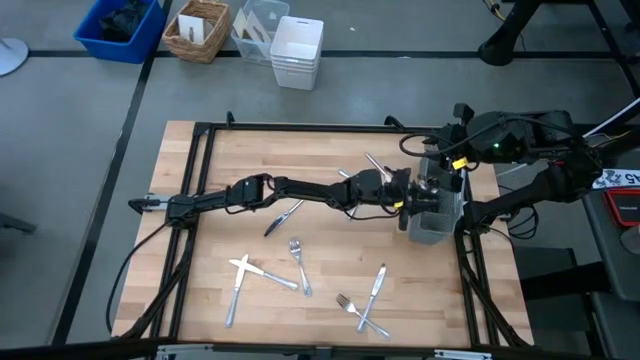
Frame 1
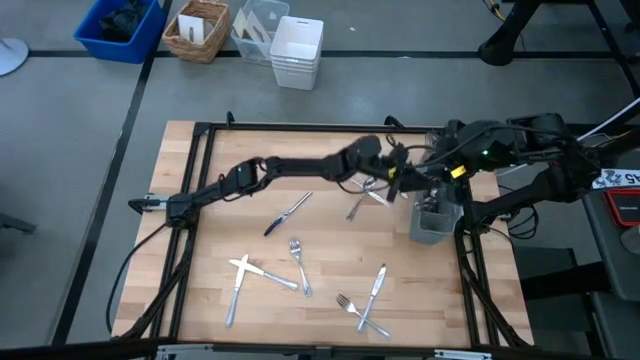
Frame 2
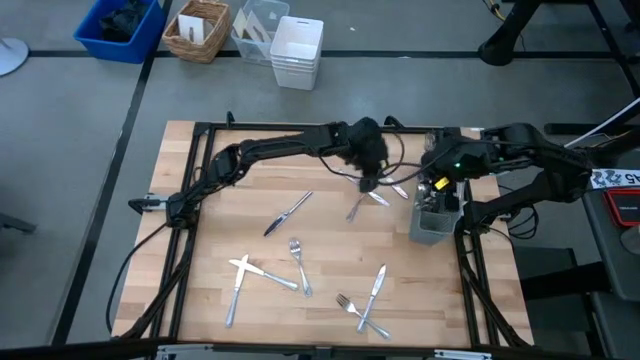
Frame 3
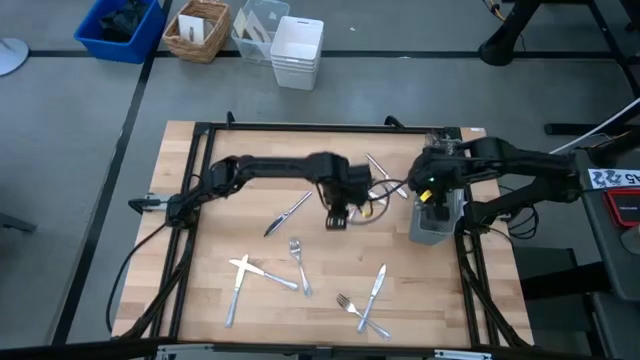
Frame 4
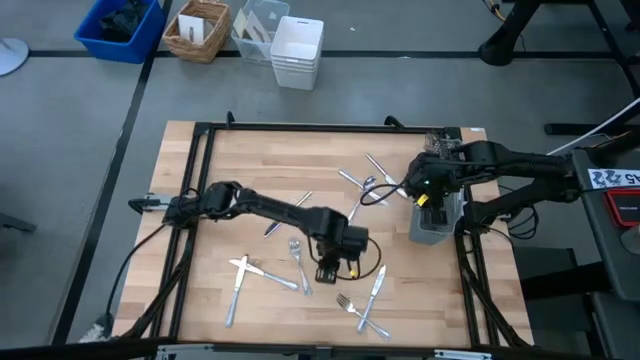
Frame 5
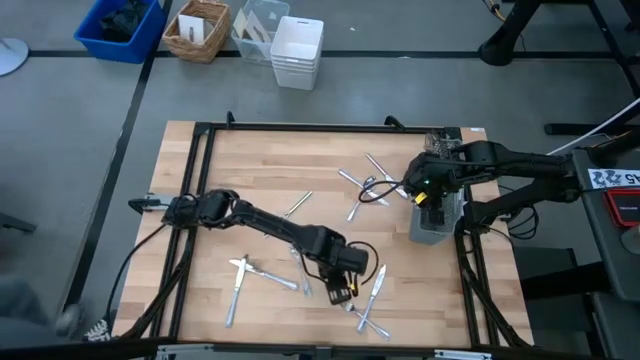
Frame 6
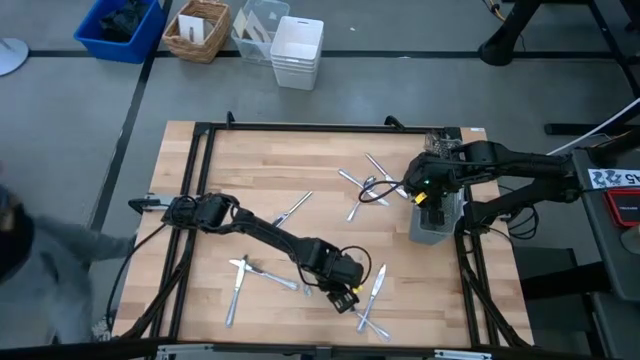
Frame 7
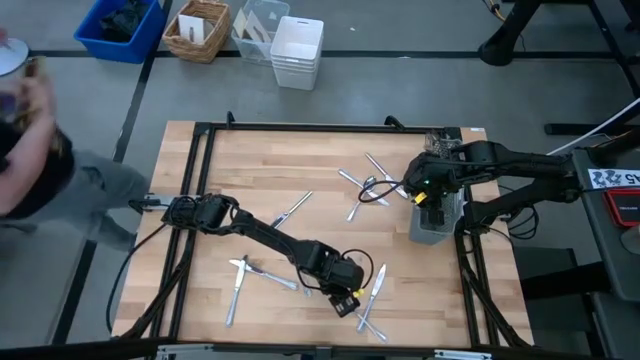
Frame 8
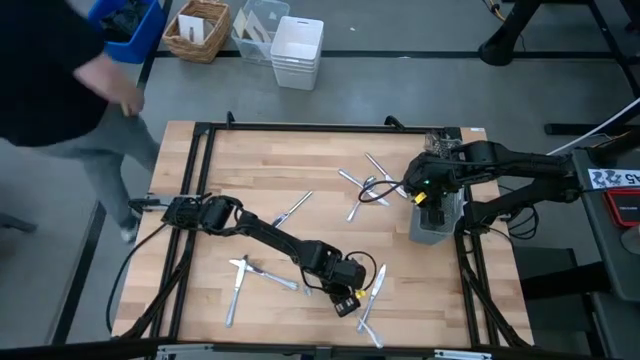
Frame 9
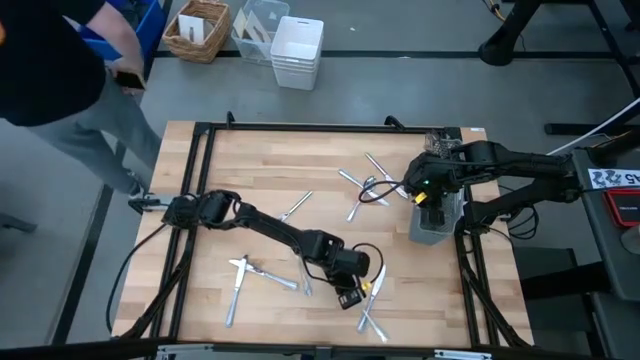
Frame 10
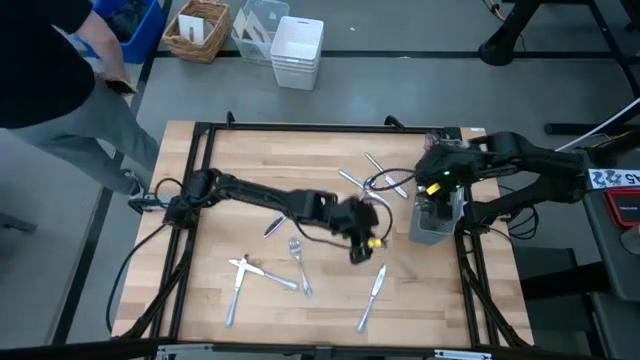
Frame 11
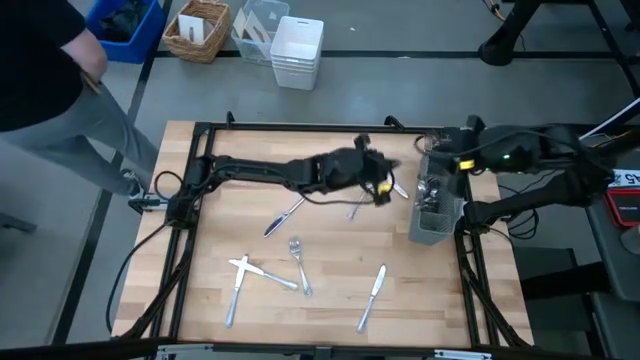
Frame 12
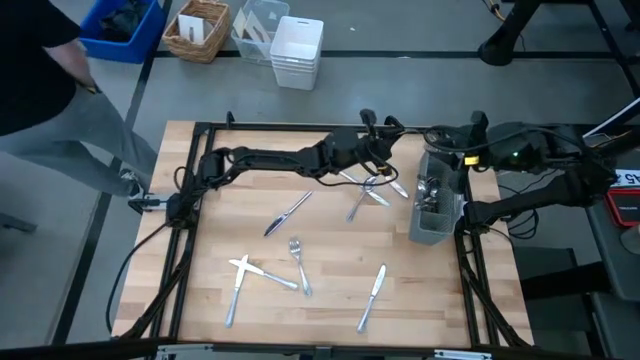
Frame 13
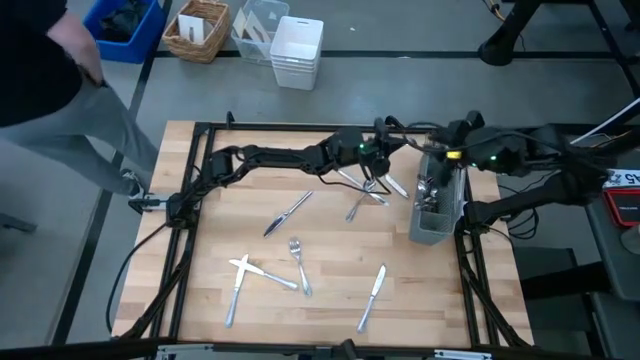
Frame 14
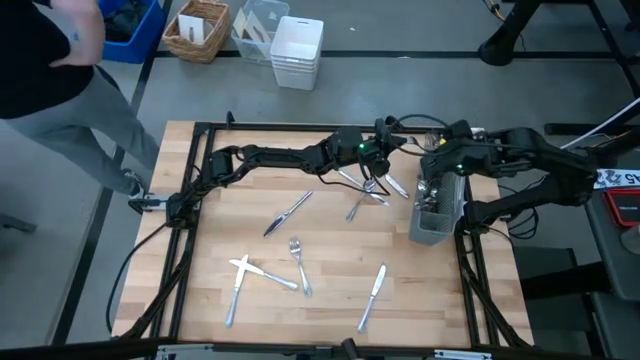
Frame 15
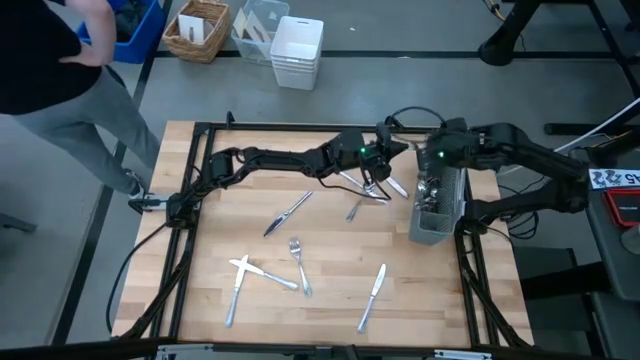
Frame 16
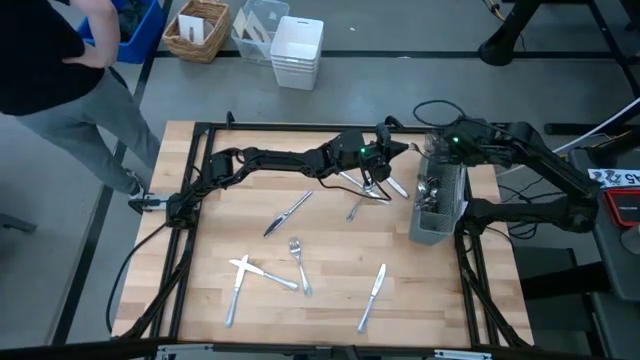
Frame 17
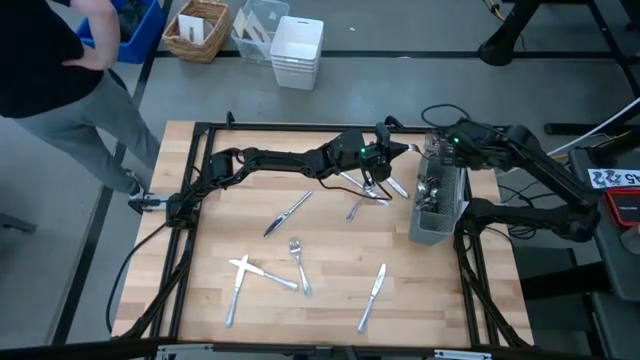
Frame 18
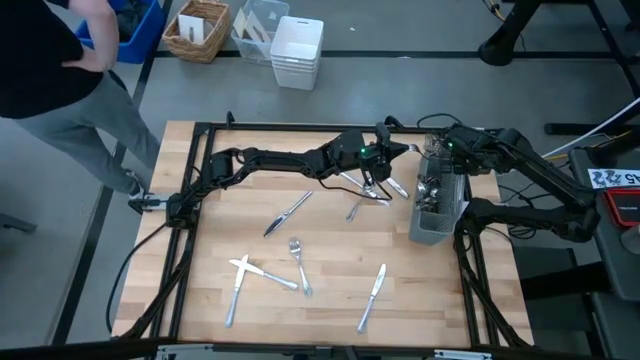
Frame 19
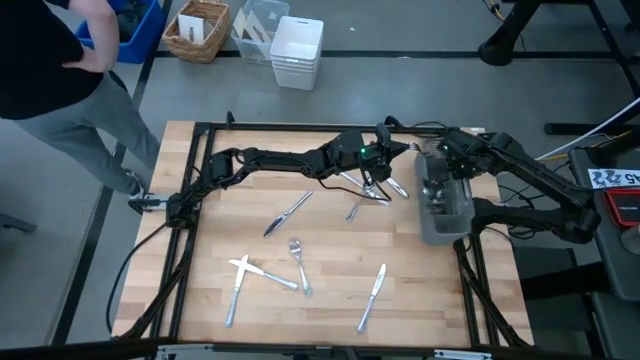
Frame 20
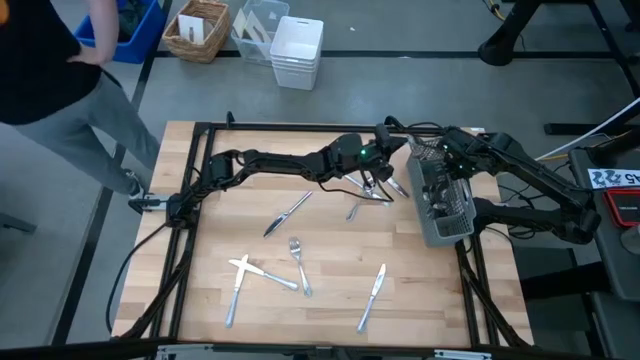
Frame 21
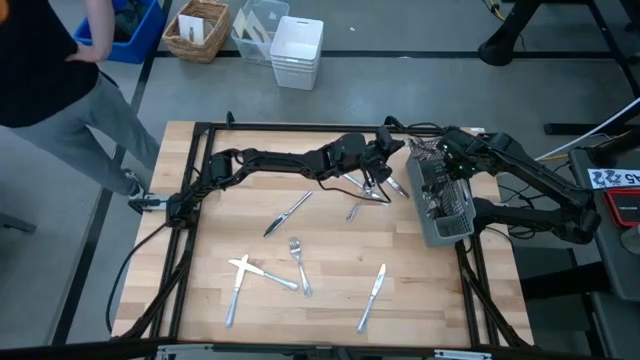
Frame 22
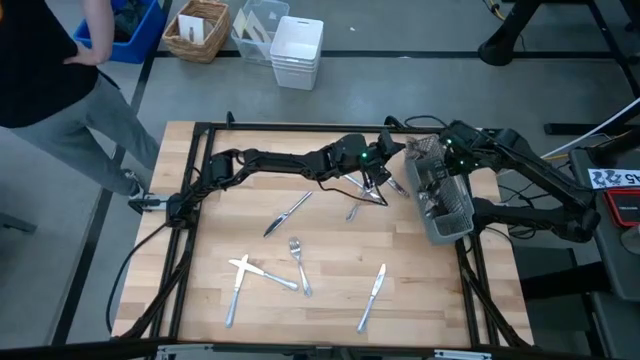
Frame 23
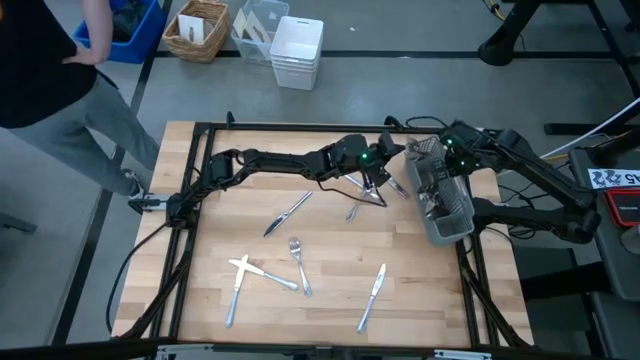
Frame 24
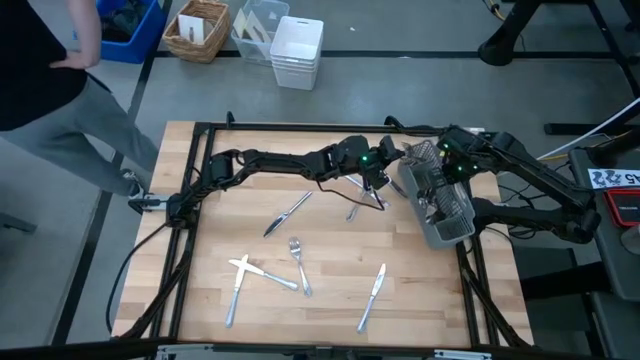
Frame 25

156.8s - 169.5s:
Task: Sort silverware
Put the bottom fork into the left section of the utensil holder

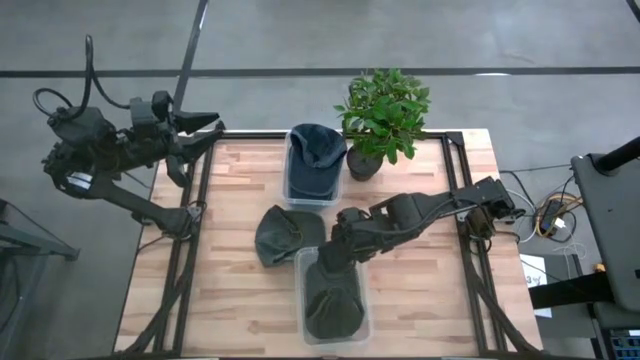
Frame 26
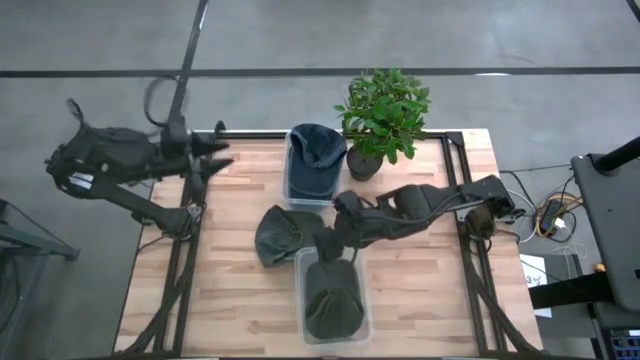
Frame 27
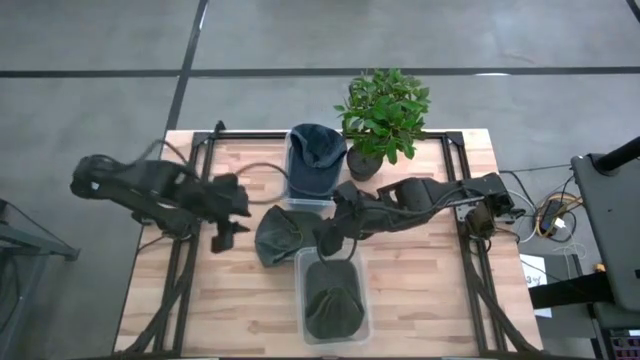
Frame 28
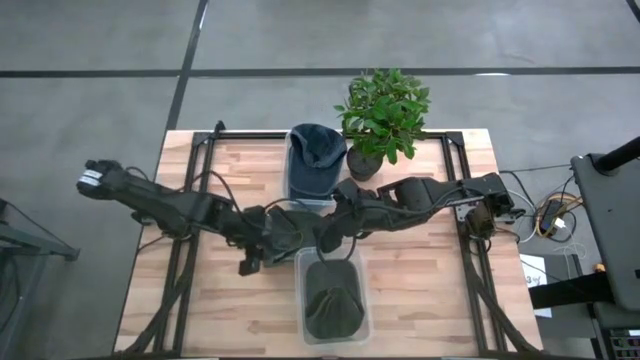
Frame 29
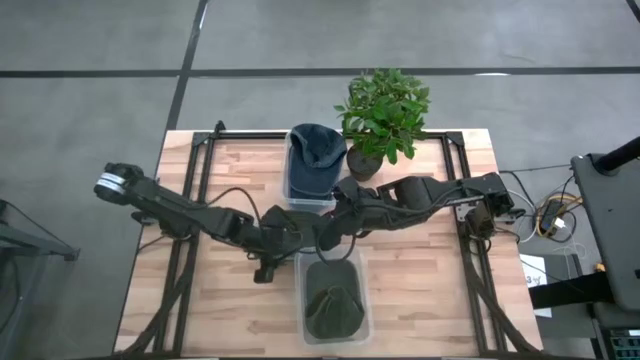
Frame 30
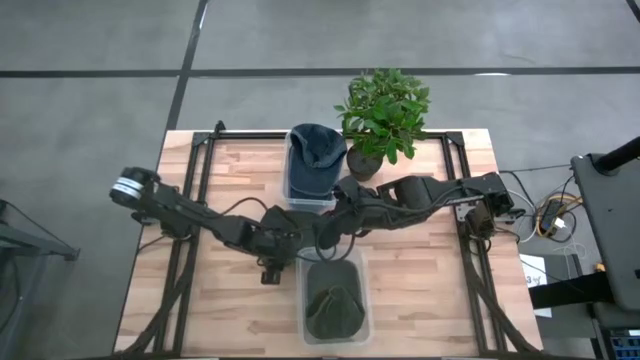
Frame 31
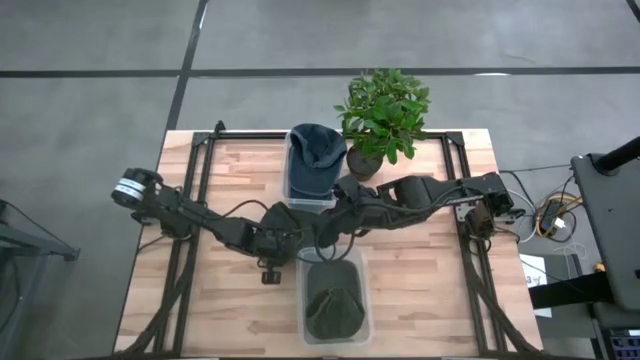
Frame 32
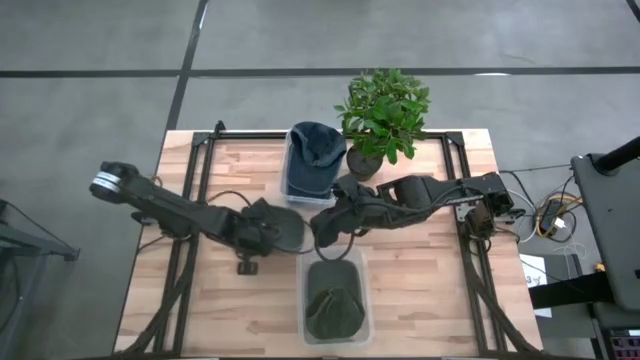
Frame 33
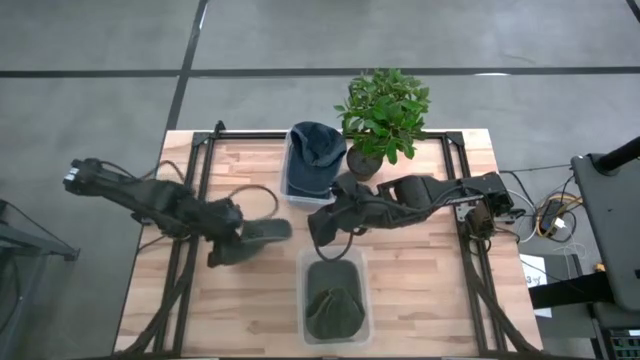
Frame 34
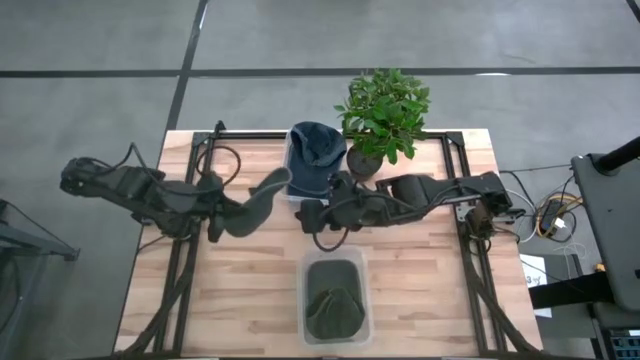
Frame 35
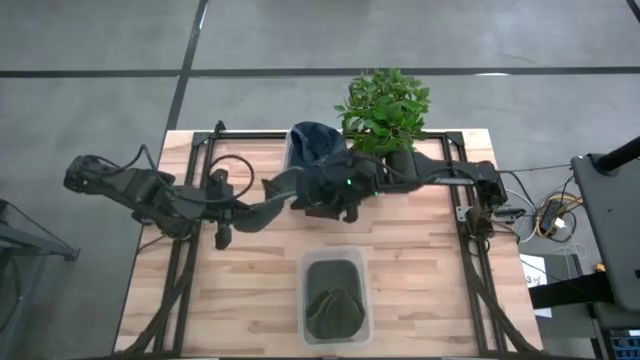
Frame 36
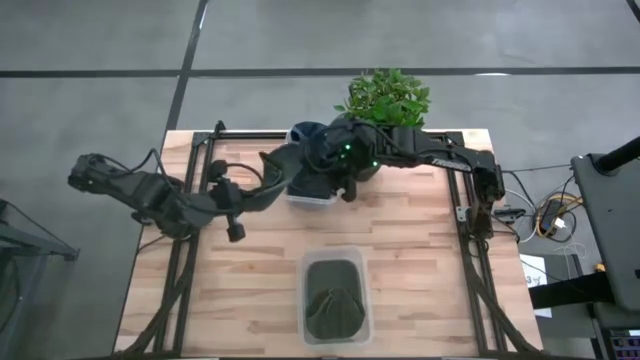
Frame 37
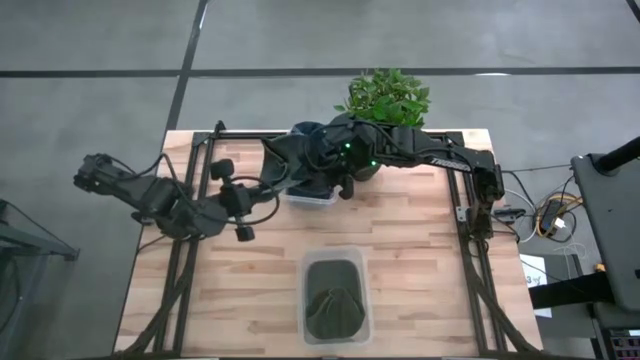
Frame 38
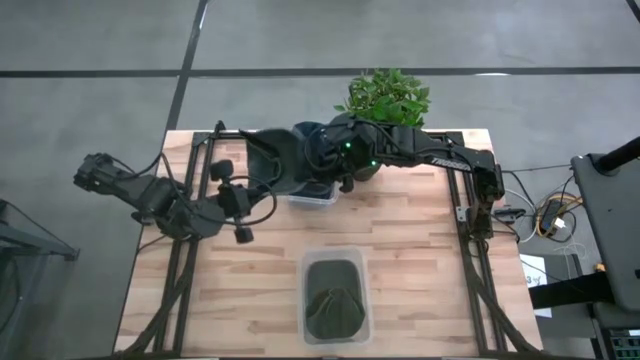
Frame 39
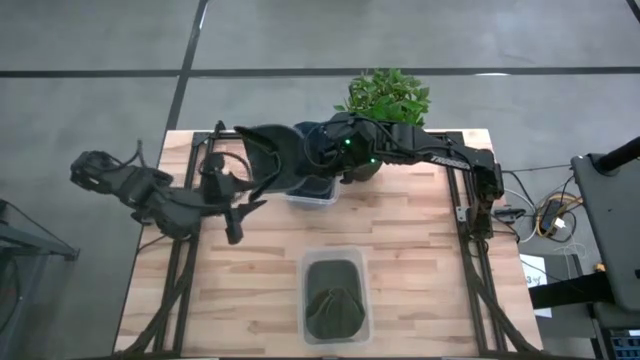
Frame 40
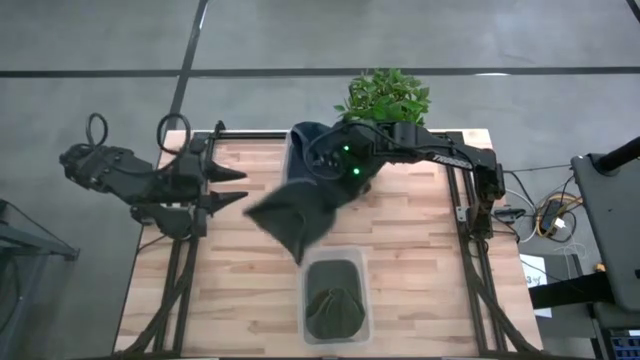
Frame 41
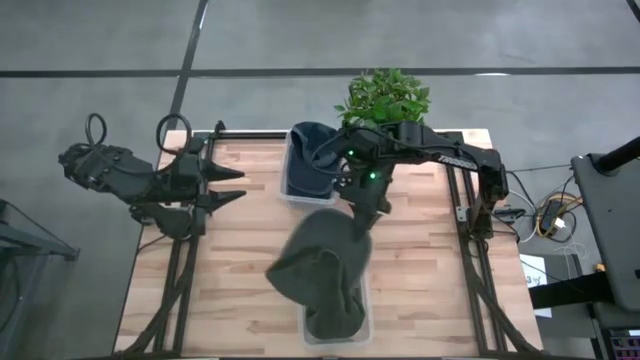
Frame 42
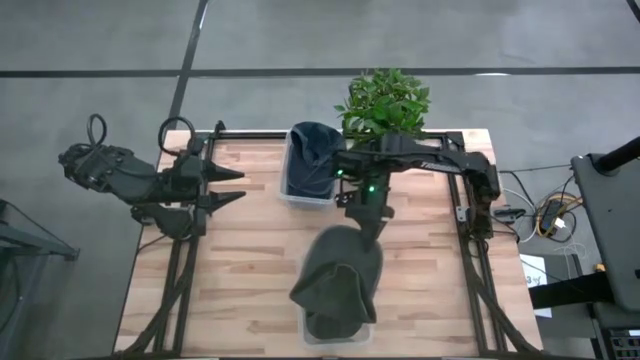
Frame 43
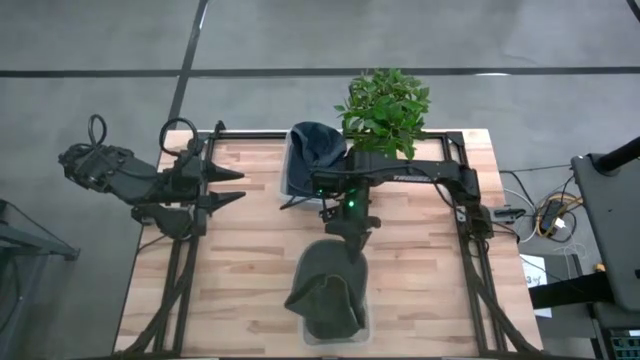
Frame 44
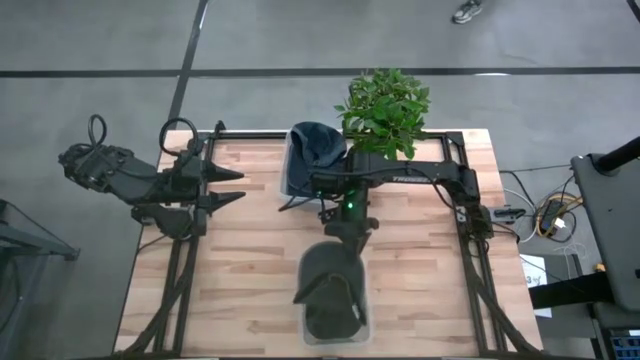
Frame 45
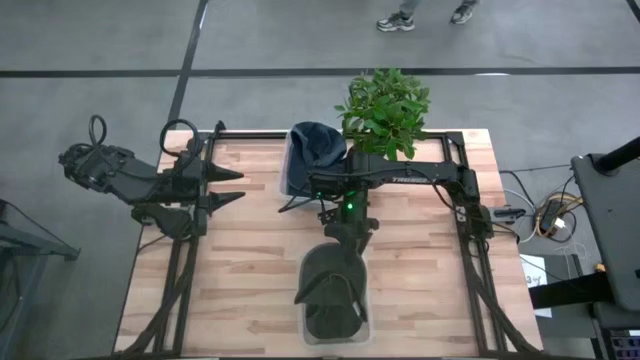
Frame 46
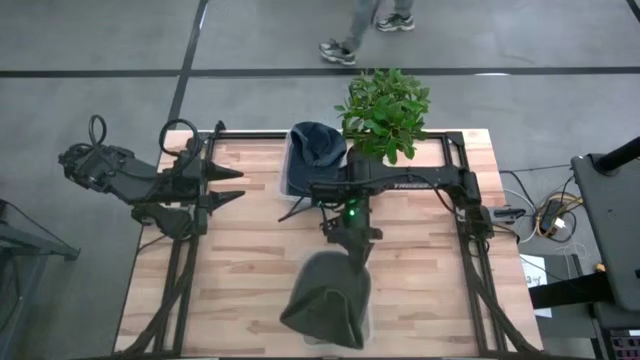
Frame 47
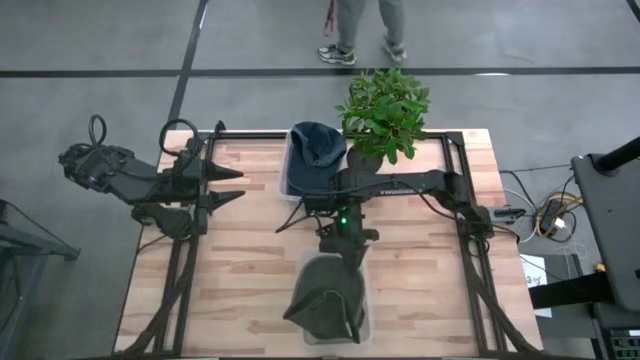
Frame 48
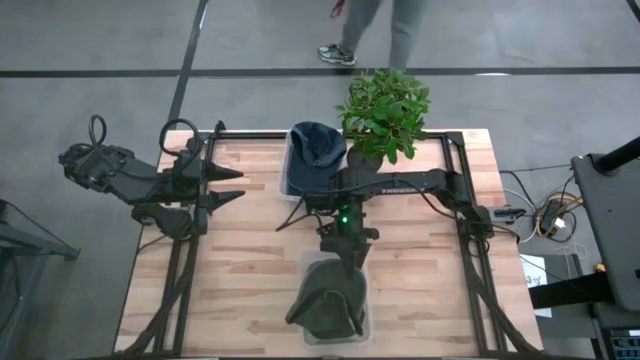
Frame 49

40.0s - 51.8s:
Task: Pick & Place hat
Put the gray cap into the bottom transparent bin
